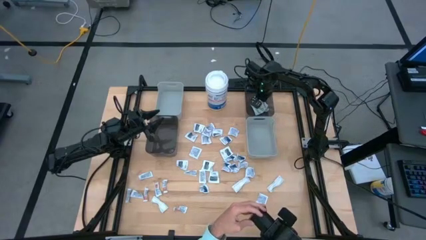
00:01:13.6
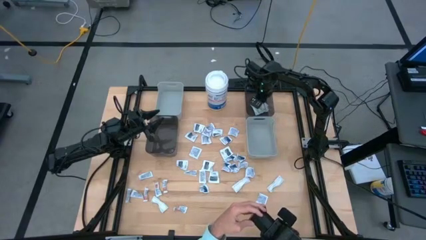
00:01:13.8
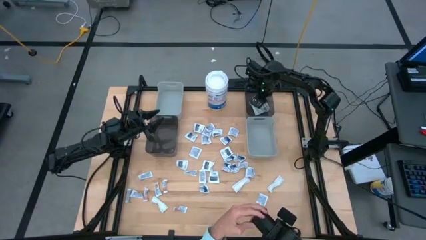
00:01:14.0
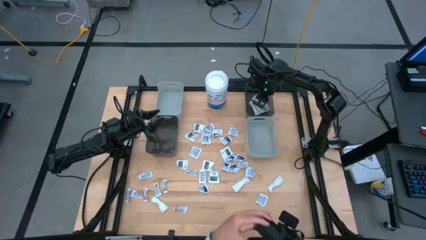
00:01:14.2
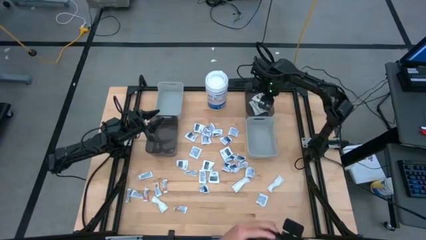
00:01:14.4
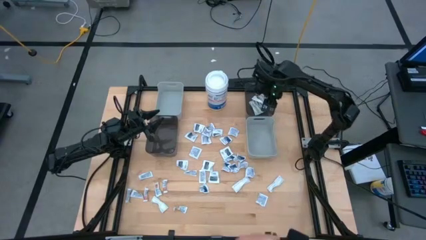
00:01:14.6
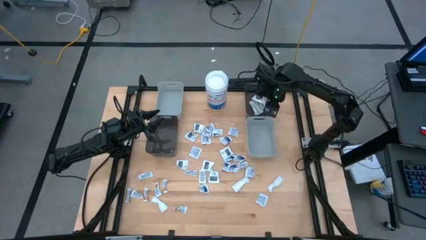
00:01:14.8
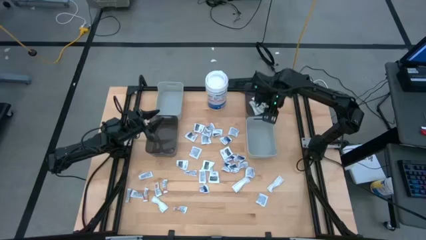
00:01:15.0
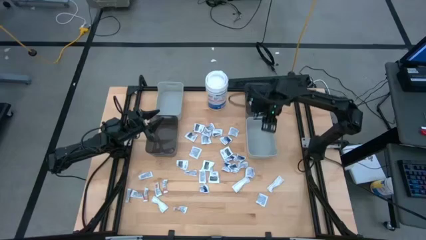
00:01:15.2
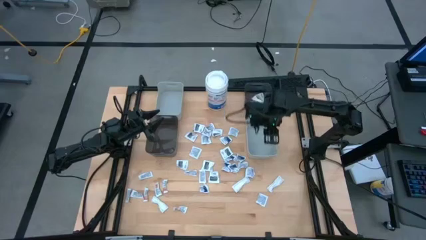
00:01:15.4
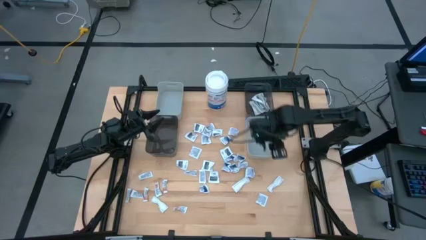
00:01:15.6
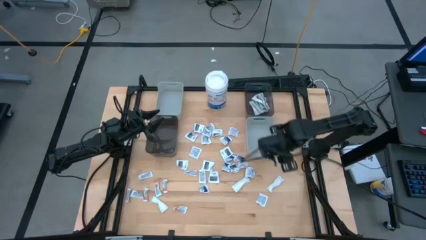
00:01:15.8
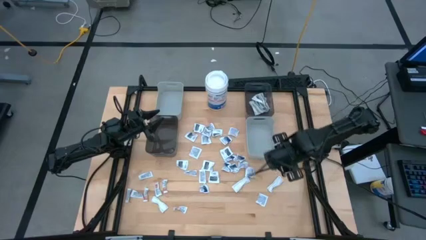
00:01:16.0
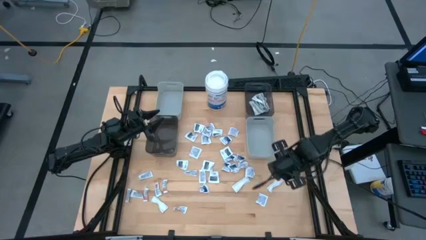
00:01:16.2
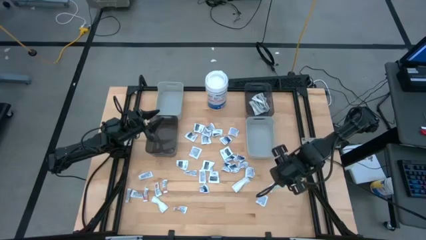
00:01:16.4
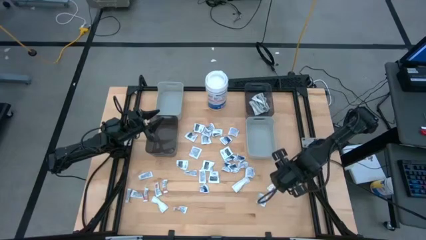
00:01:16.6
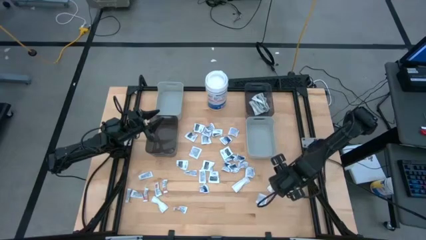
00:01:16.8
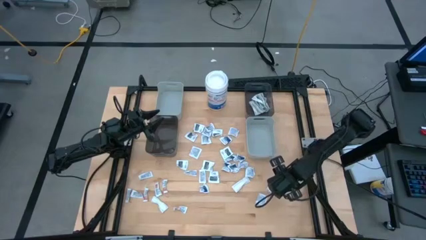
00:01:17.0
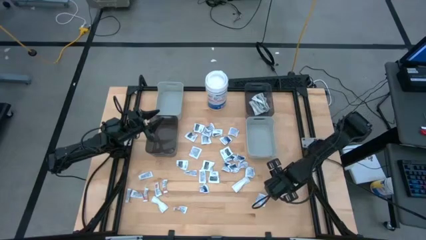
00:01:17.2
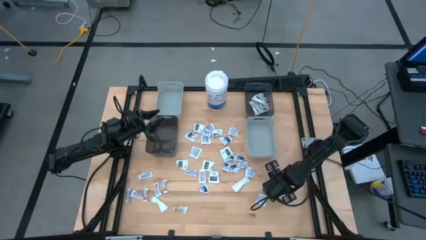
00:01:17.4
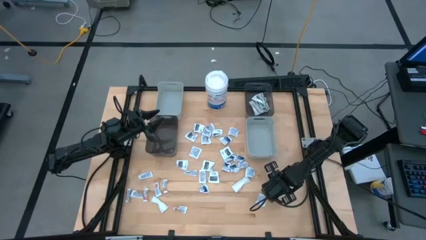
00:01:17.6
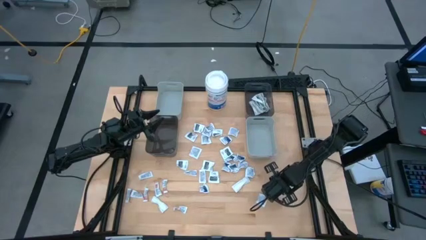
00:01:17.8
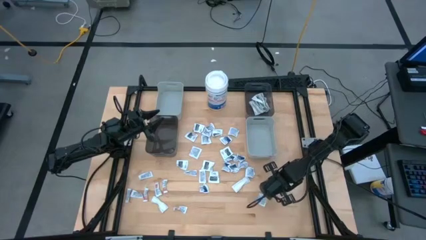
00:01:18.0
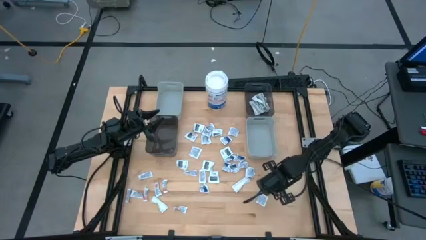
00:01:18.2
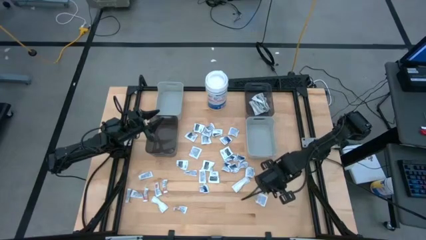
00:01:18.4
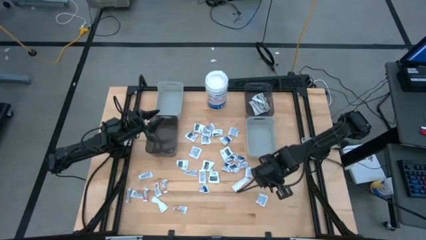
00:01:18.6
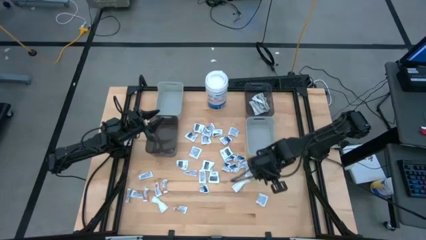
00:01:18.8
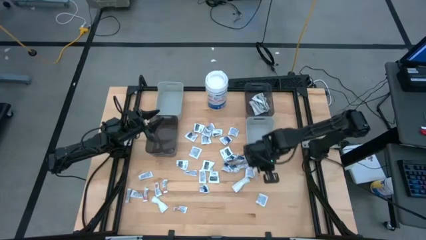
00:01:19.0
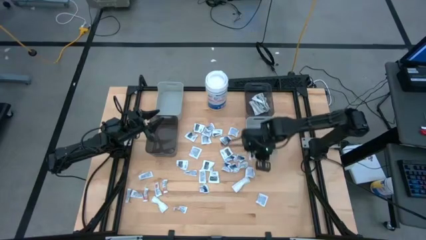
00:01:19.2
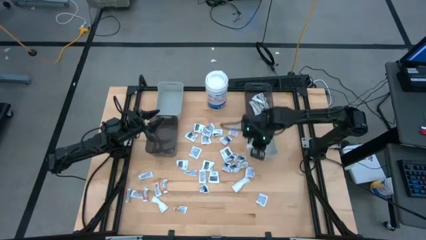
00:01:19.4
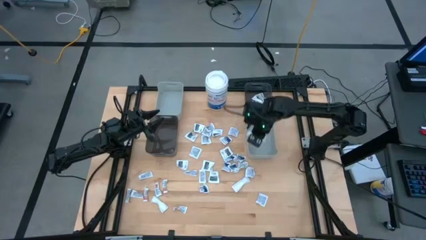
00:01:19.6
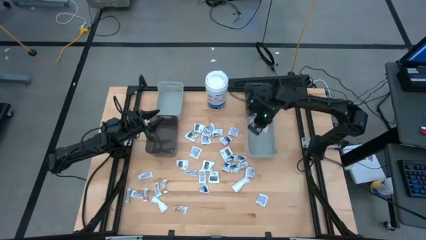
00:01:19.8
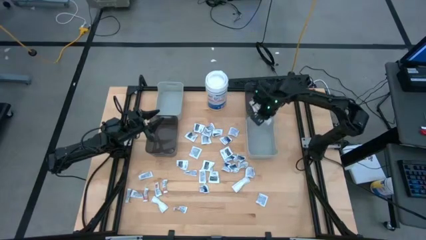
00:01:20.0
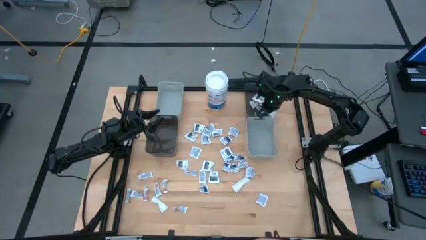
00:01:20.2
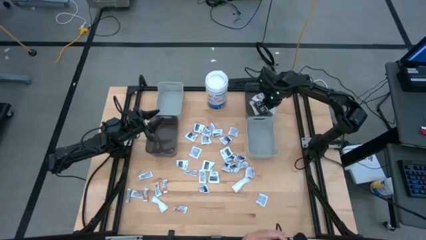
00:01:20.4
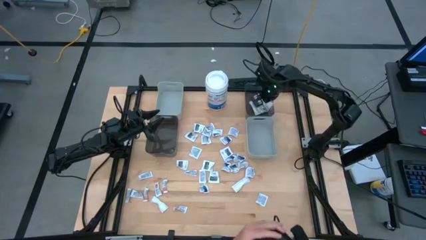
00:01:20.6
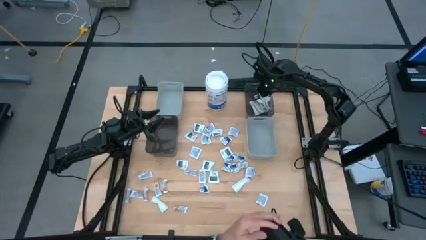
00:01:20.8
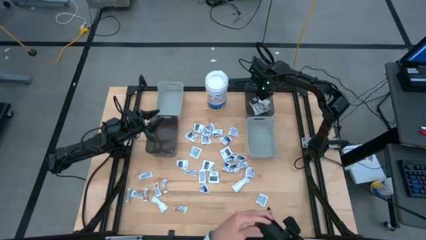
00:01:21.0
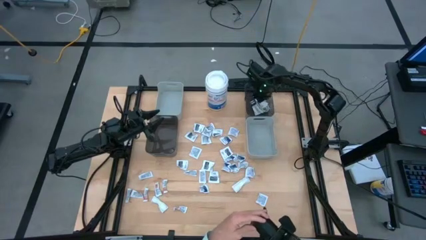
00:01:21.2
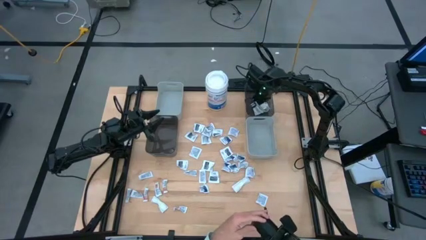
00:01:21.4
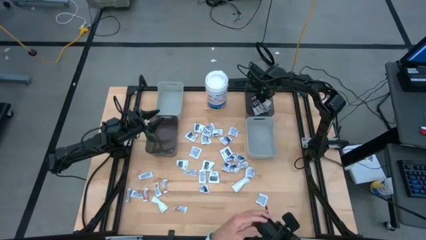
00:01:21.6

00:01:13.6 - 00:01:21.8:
Task: Pick & Place First Aid Supplies
Put the green bandage into the right black bin

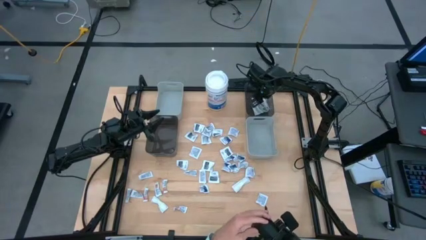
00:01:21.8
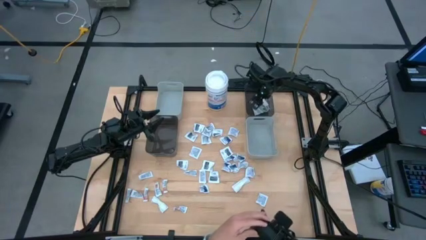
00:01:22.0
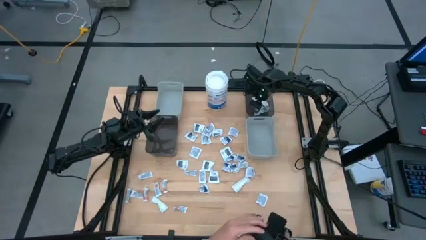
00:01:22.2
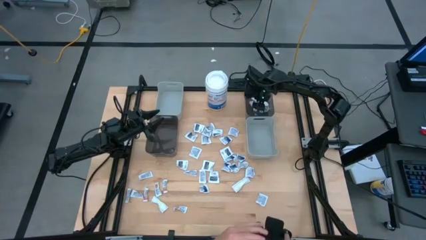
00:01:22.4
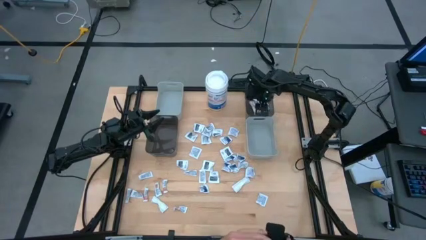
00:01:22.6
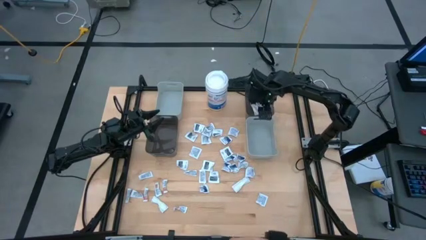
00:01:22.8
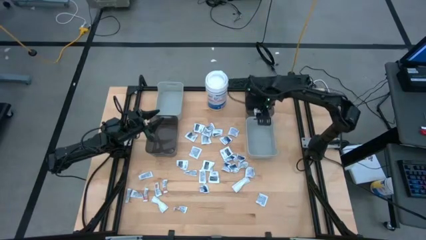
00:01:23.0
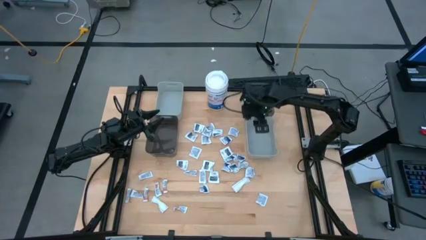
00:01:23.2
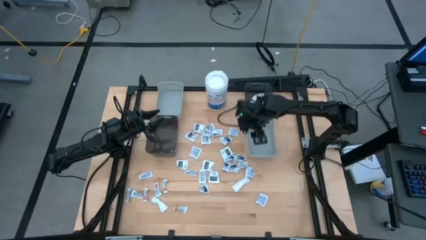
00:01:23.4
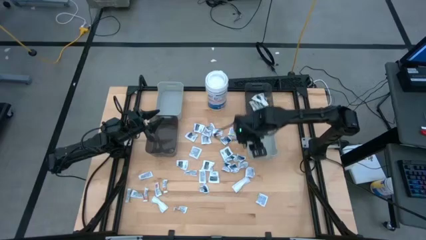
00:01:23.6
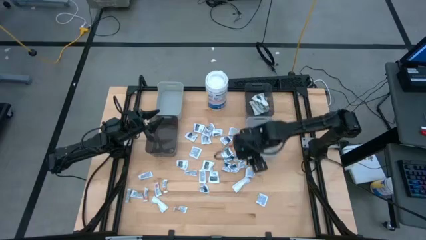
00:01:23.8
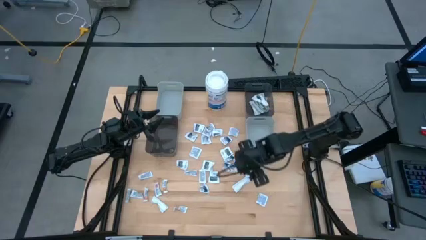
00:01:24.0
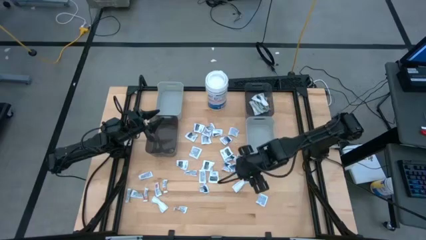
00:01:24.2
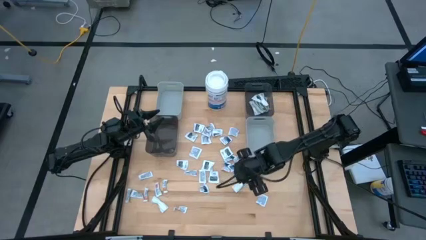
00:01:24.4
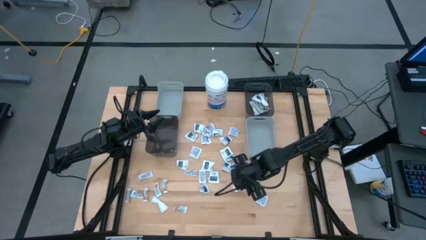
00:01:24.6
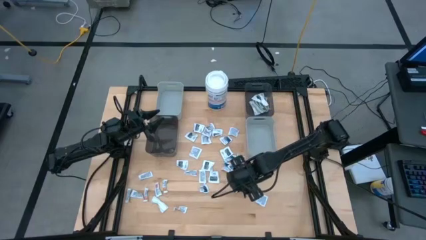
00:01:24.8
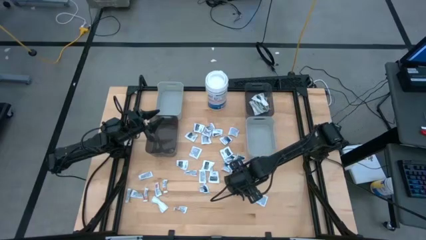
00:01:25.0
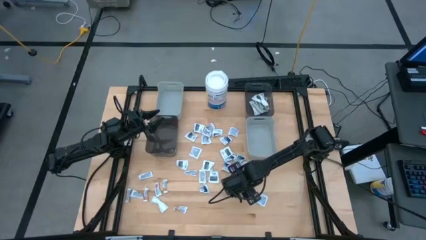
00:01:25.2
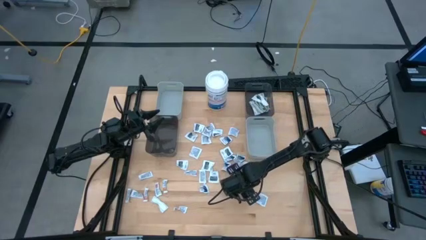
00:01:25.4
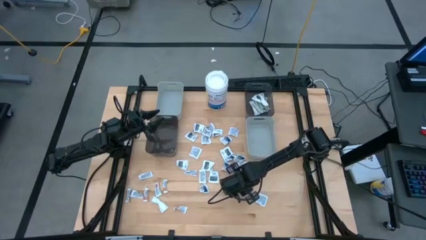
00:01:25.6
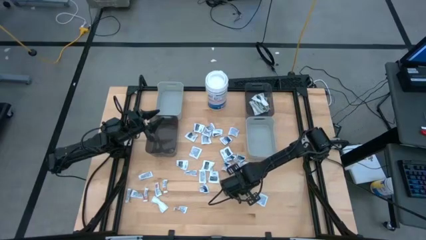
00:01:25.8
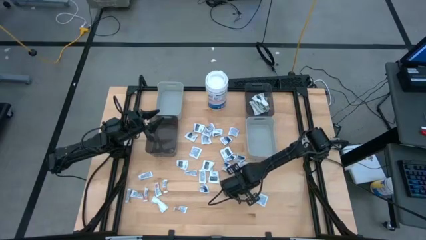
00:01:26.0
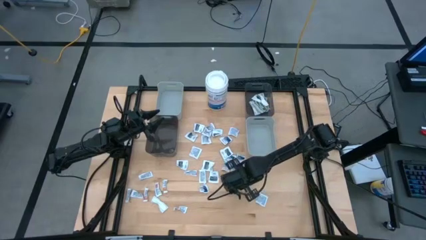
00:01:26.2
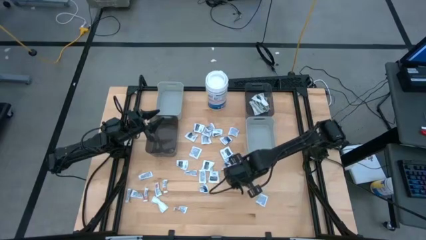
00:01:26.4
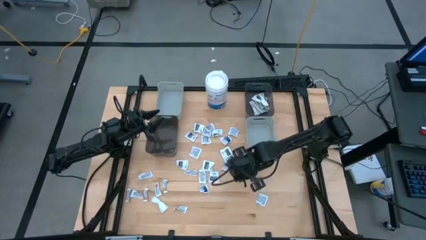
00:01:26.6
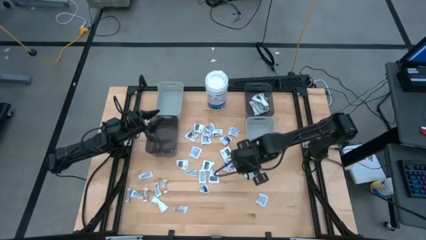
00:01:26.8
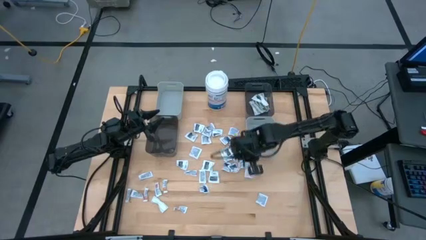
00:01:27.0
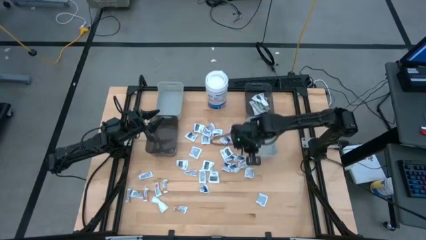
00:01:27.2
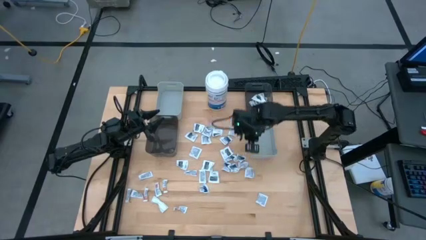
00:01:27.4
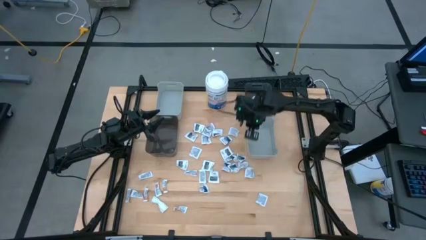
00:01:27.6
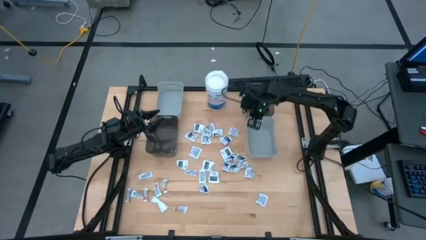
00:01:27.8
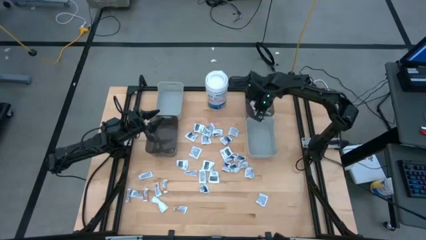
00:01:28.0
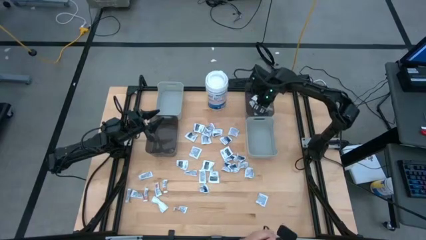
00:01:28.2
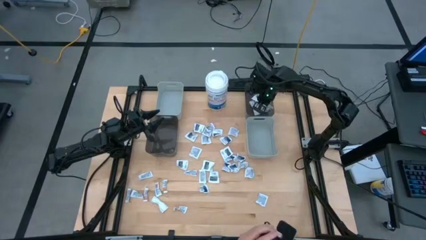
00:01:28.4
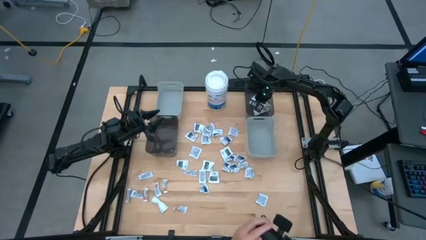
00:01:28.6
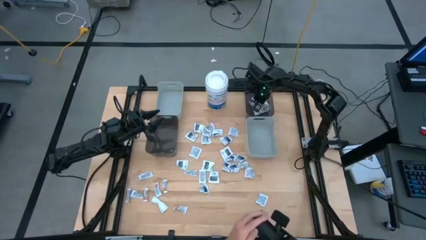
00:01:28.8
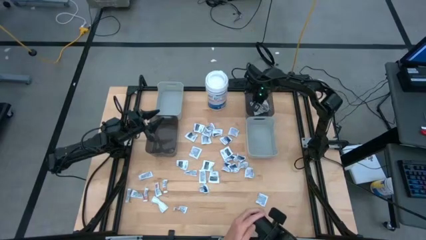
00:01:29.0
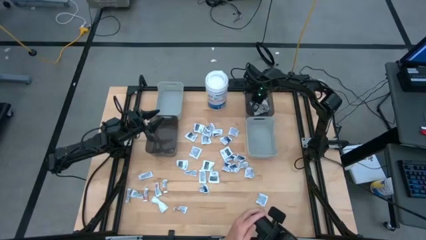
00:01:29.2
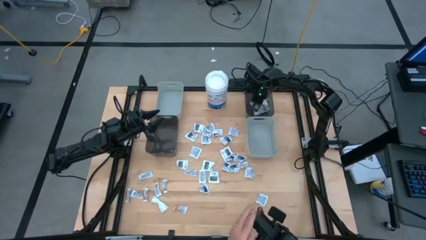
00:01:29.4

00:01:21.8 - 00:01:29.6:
Put the green bandage into the right black bin
